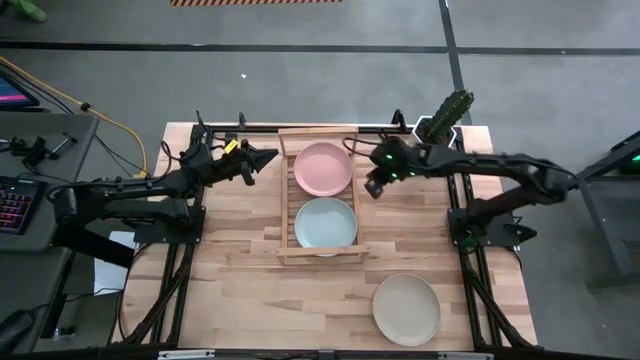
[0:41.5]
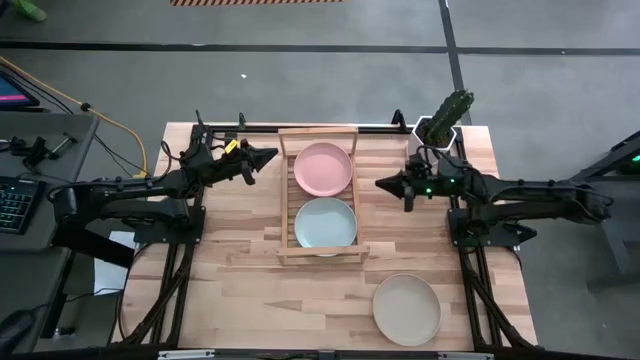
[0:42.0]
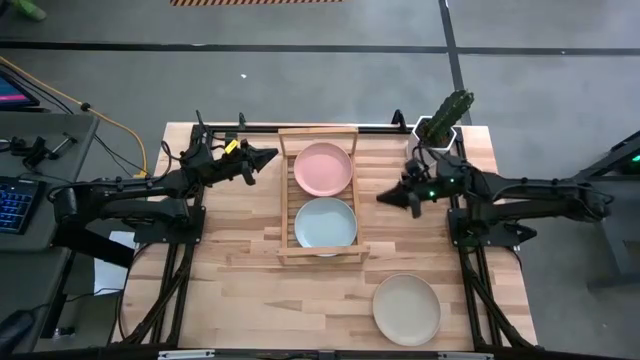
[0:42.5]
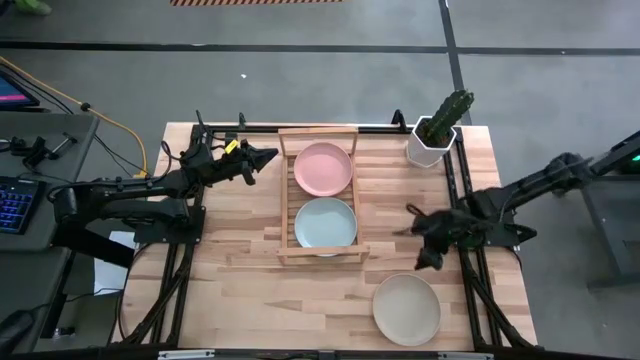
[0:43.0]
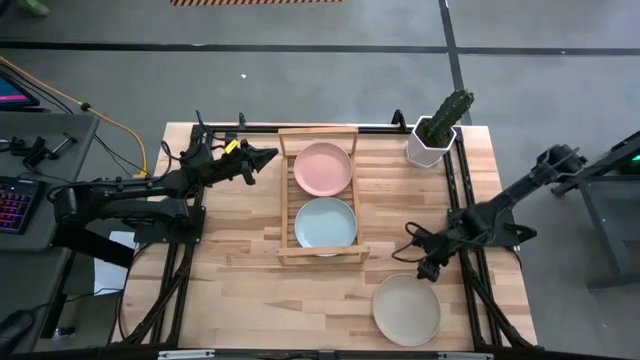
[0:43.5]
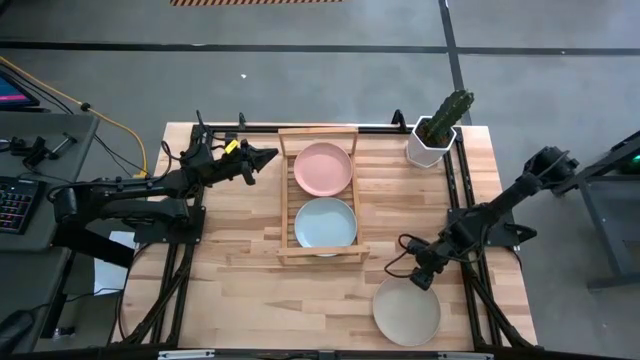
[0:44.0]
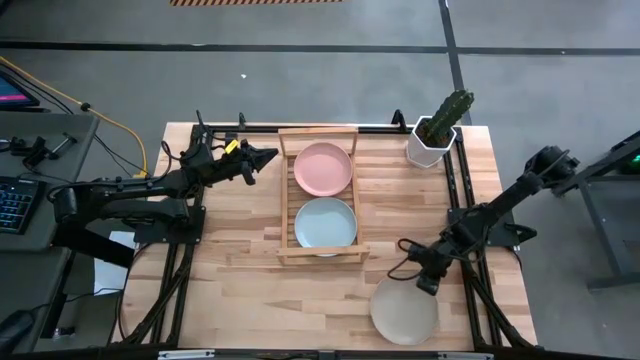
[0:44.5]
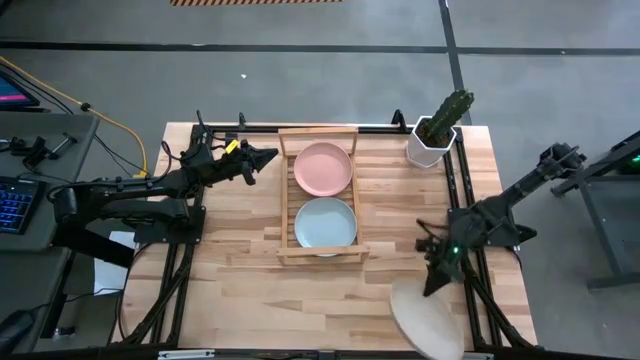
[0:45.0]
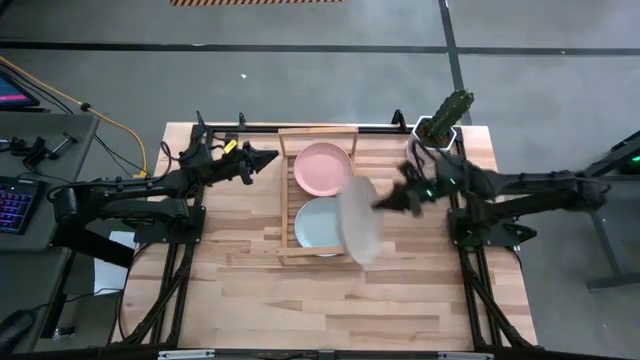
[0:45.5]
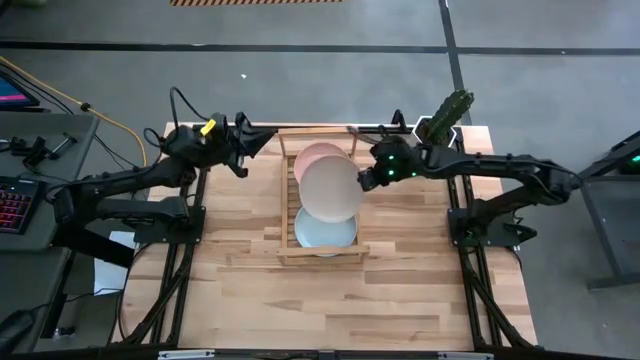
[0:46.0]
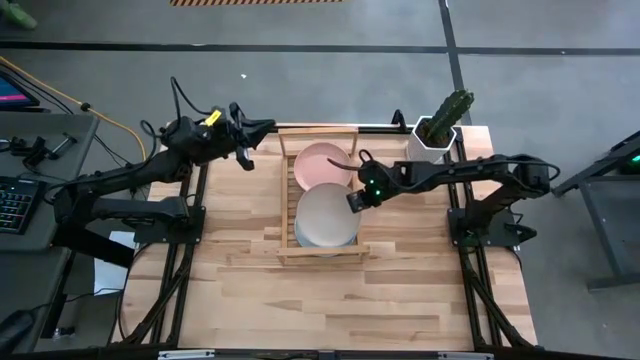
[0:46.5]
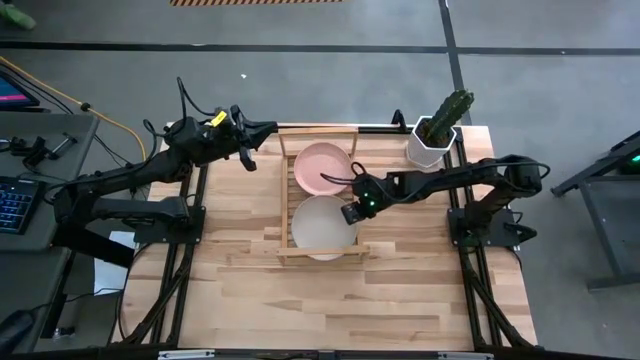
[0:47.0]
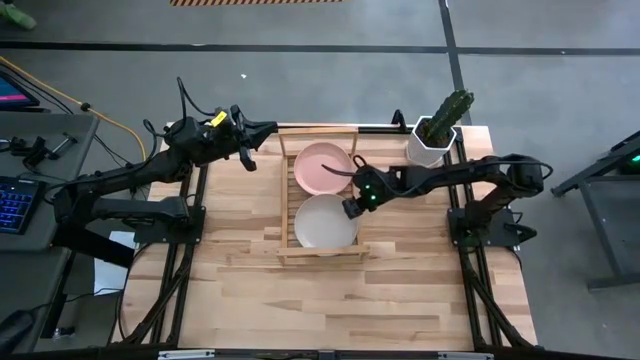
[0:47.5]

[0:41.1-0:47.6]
Task: Place and stack plates onto a shelf
Stack the white plate on top of the blue plate on the shelf

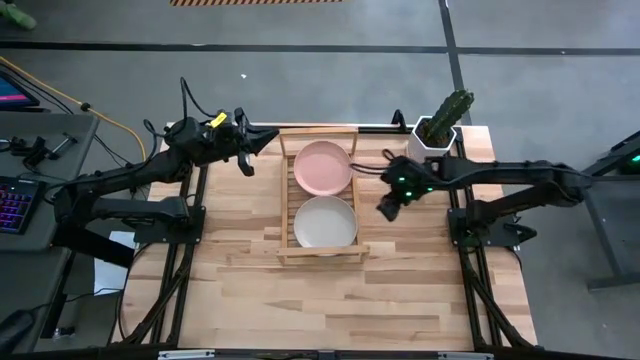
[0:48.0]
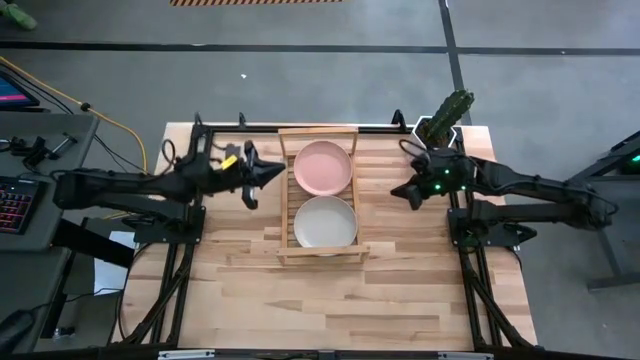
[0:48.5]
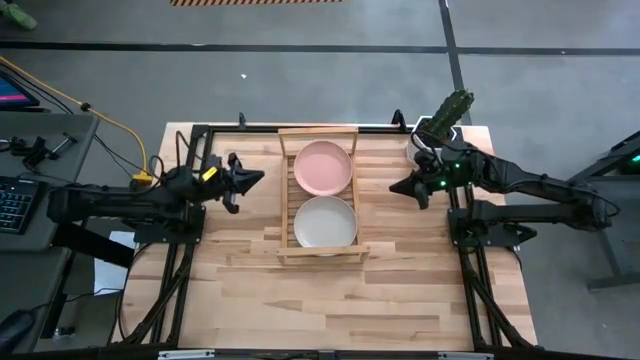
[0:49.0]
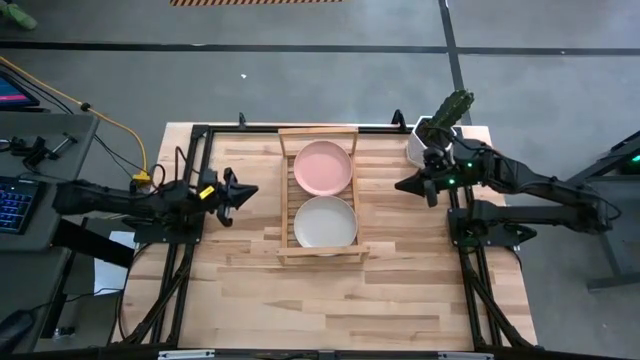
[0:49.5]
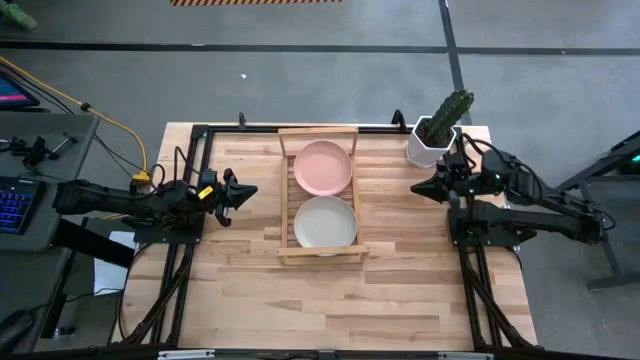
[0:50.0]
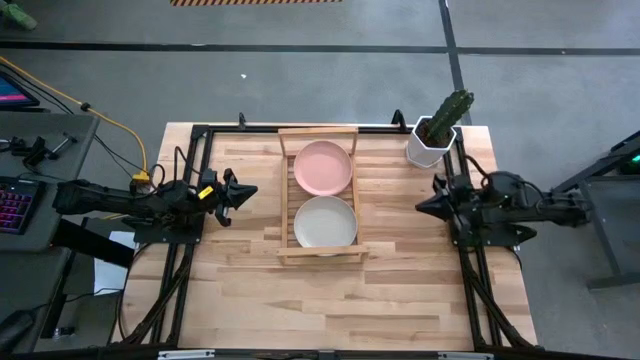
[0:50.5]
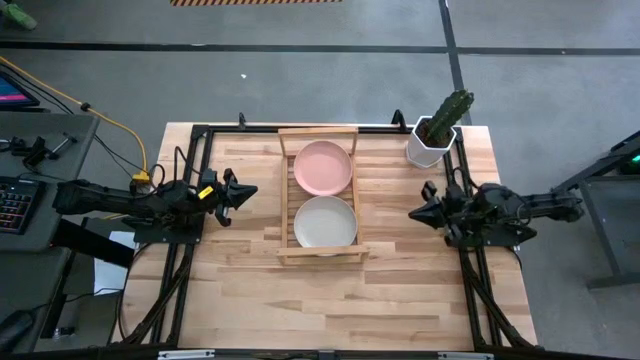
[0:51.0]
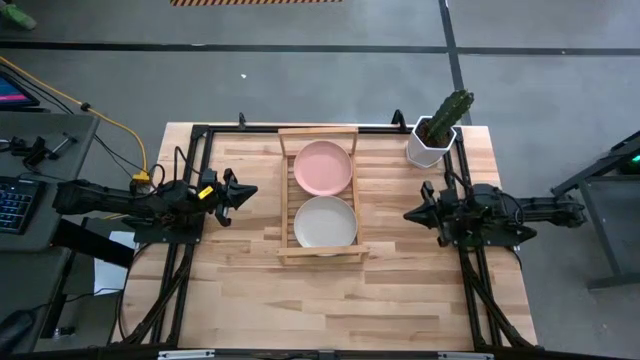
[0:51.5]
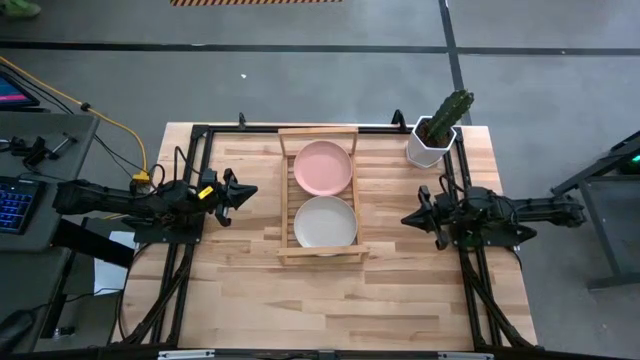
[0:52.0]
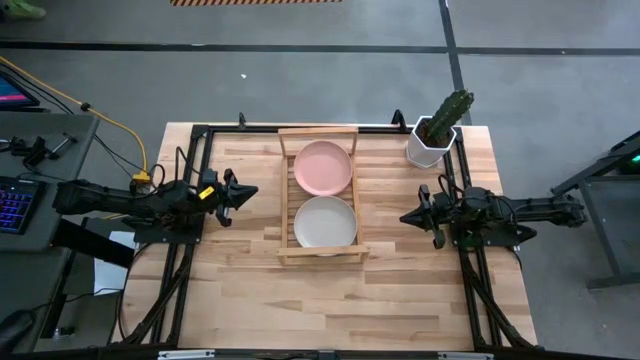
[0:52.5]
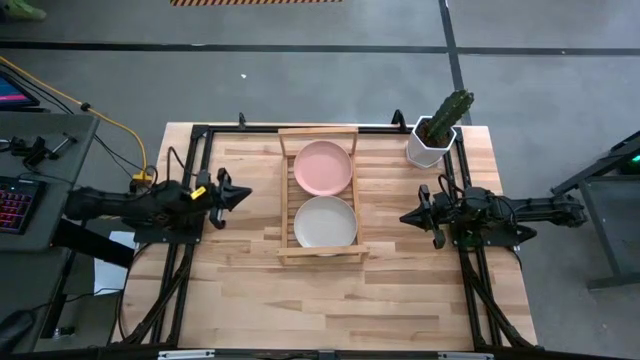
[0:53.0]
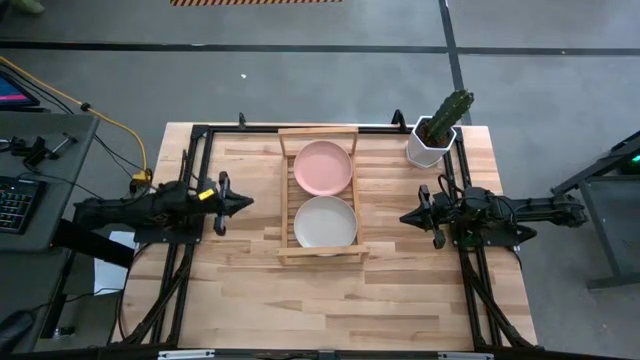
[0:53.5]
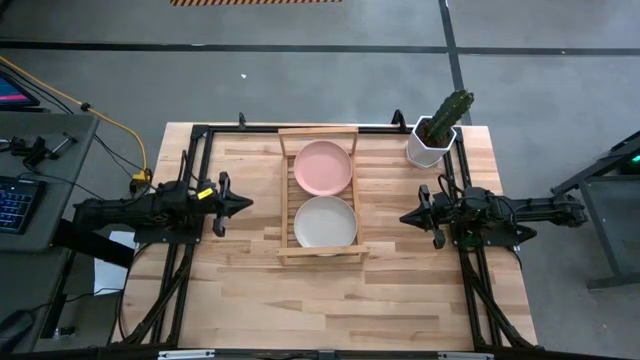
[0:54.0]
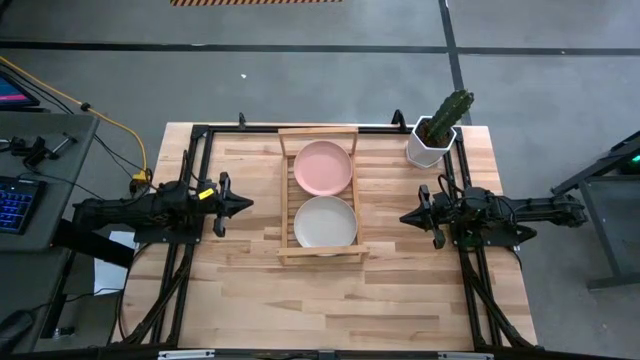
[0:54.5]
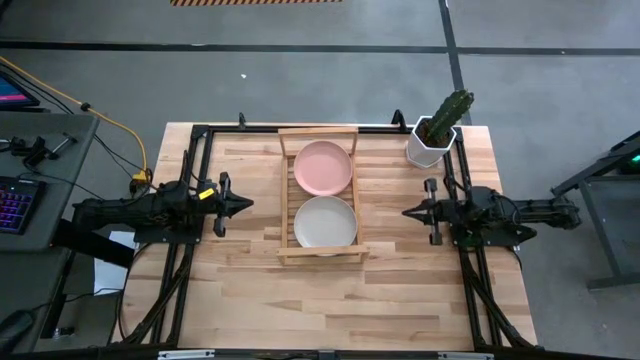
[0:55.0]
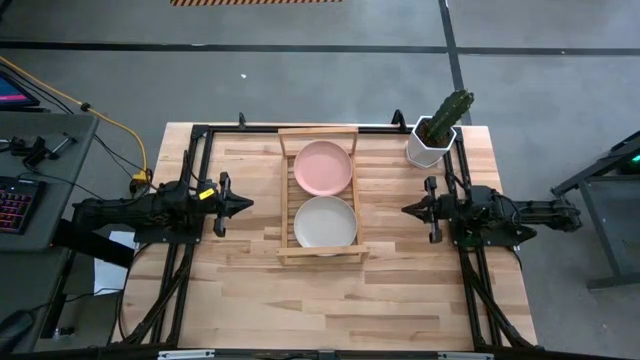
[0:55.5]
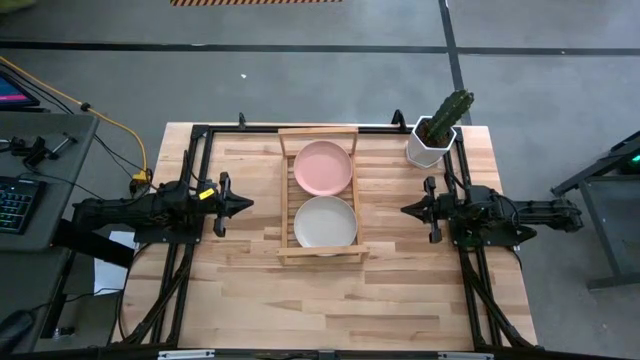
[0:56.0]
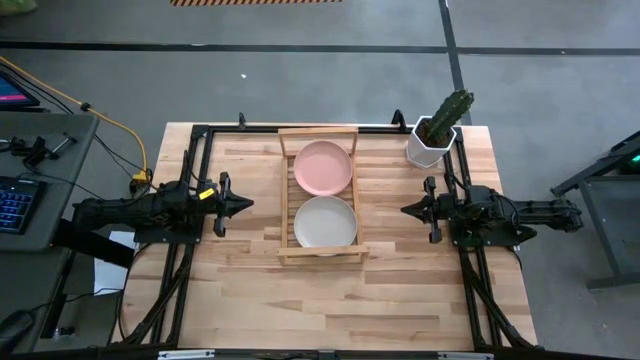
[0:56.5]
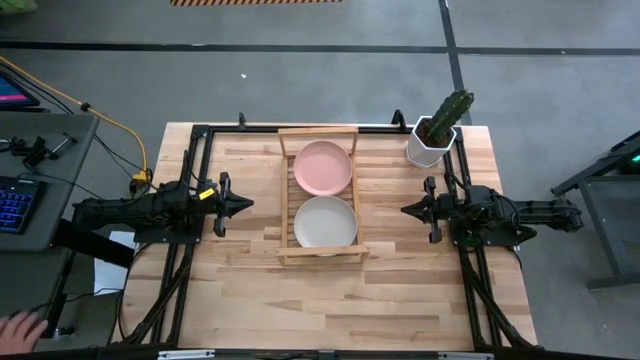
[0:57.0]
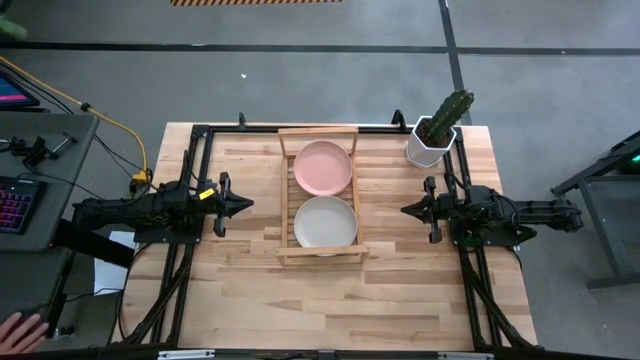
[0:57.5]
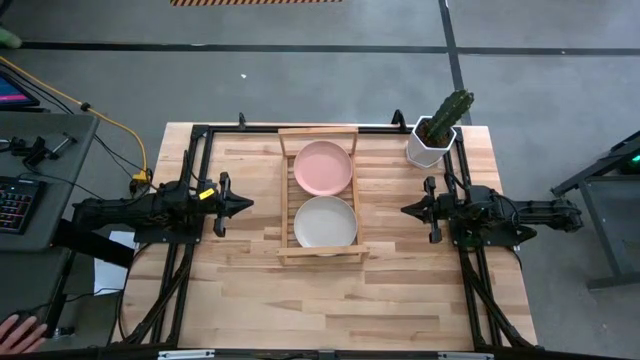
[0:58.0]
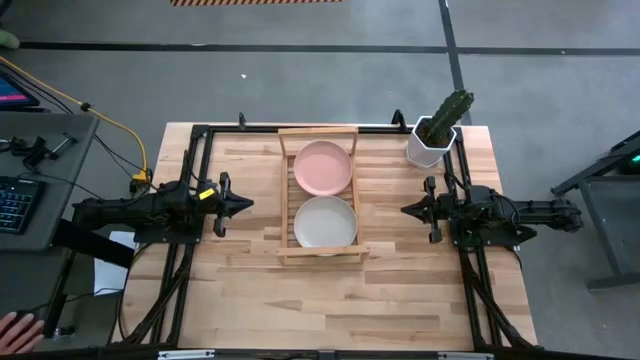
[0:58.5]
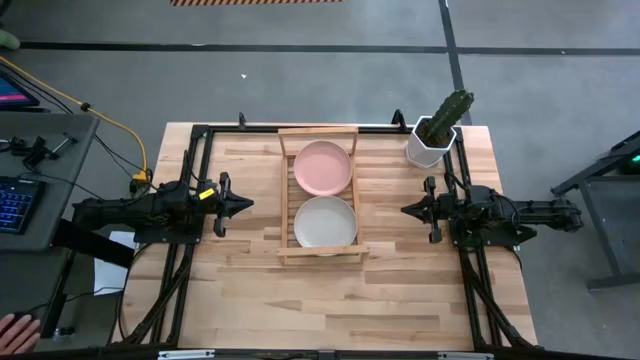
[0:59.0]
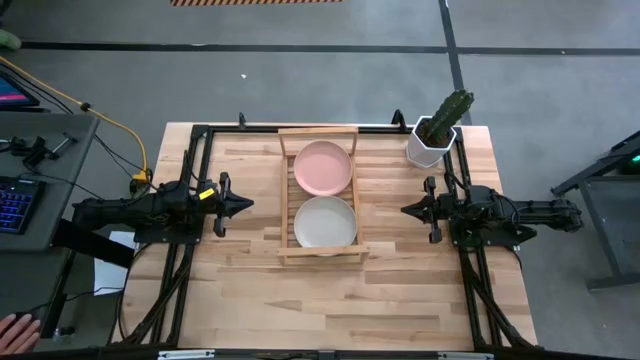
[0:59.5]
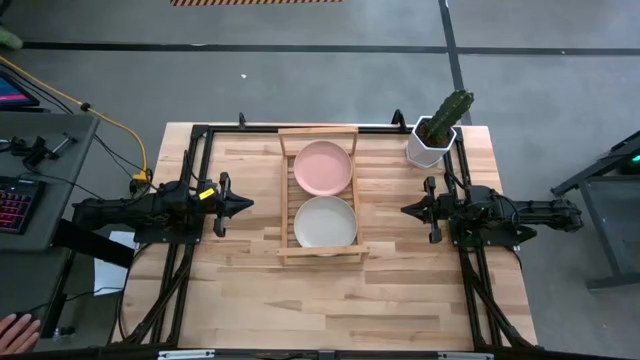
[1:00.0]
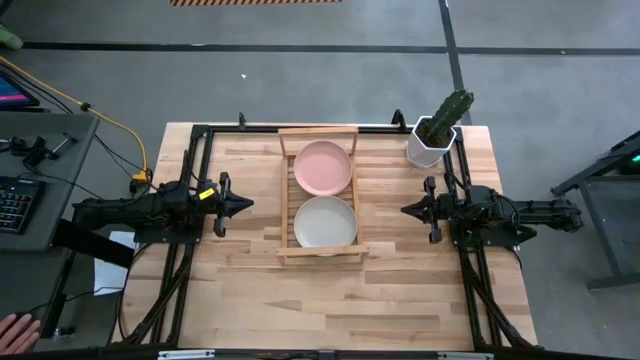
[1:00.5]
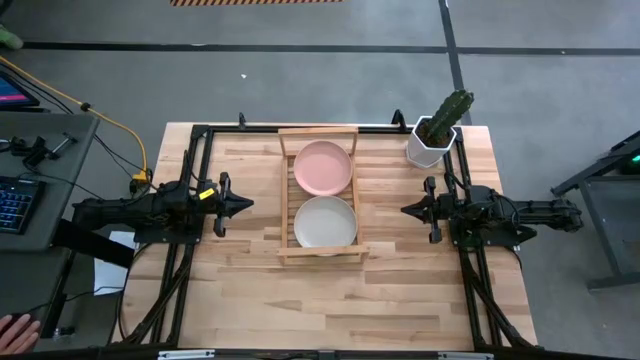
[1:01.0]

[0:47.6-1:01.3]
Return to Home Position
